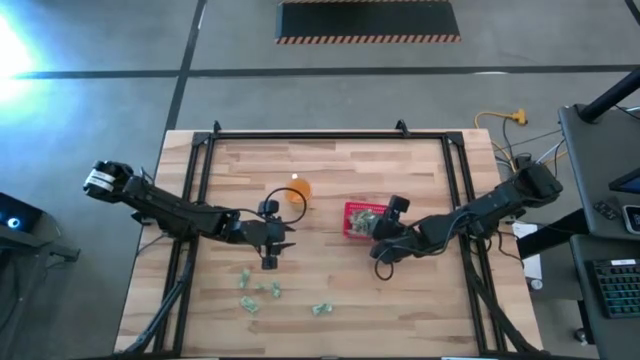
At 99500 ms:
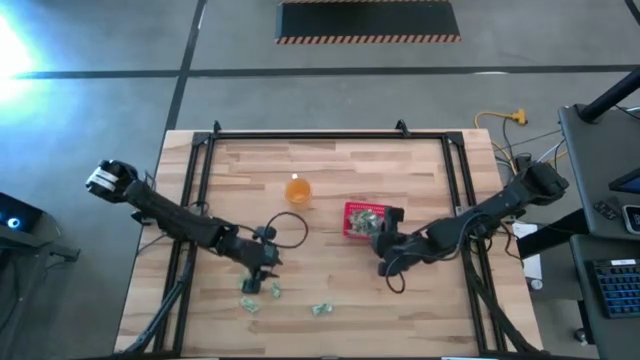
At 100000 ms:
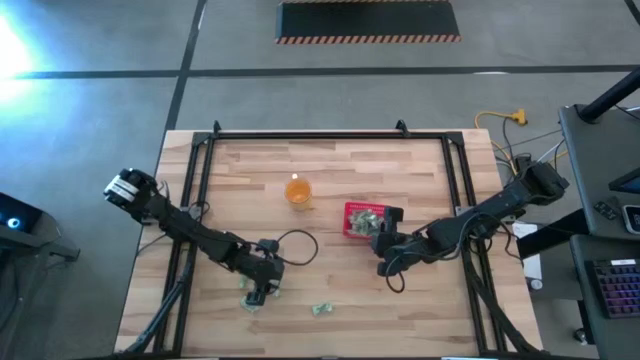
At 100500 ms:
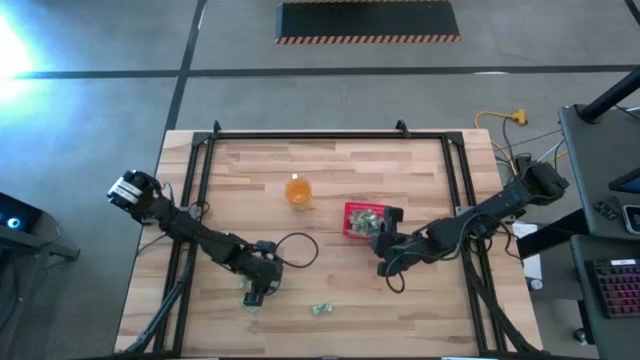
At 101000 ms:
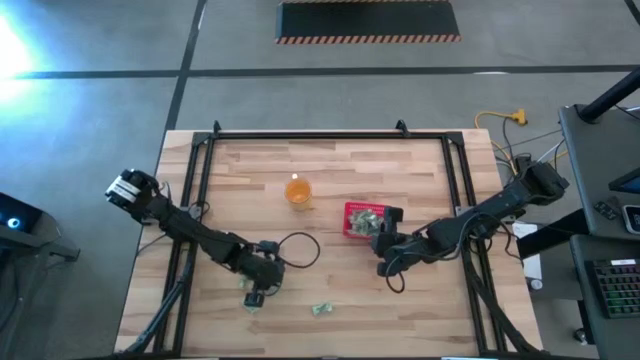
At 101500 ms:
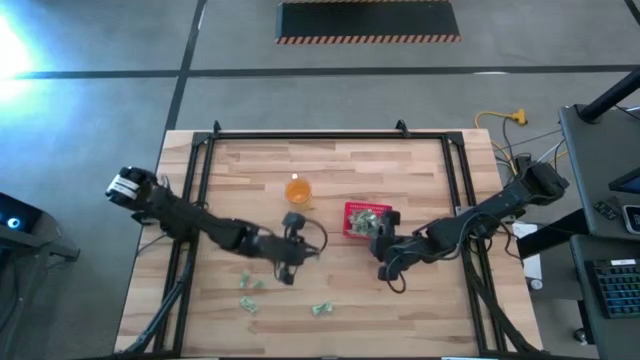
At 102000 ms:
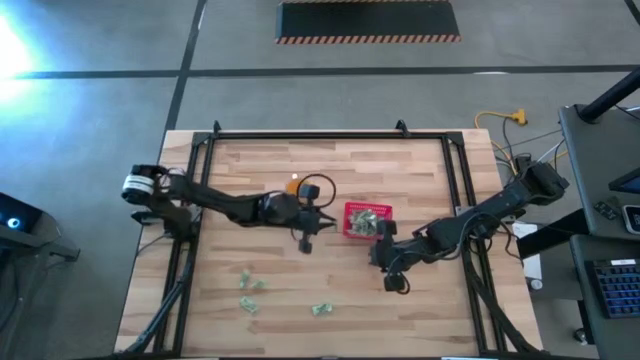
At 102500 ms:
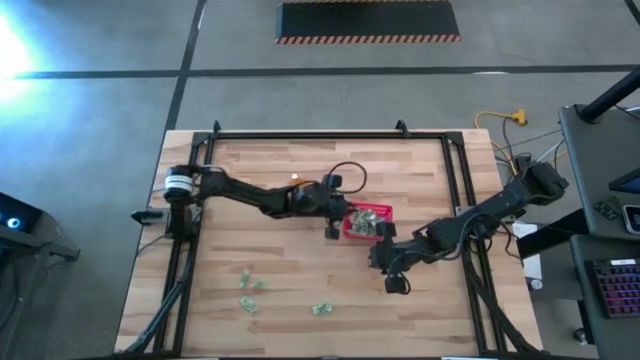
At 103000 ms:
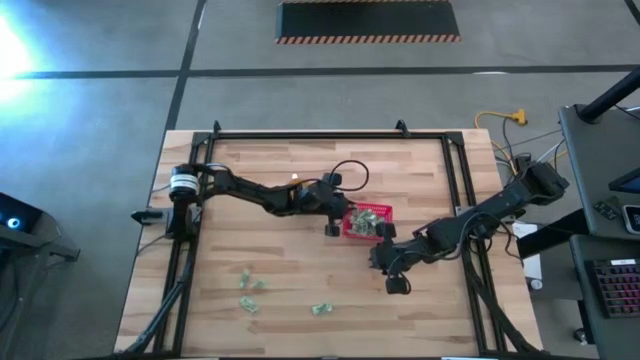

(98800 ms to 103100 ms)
Task: Pick and place Stevia / Truvia into bins
Put the stevia packet into the basket

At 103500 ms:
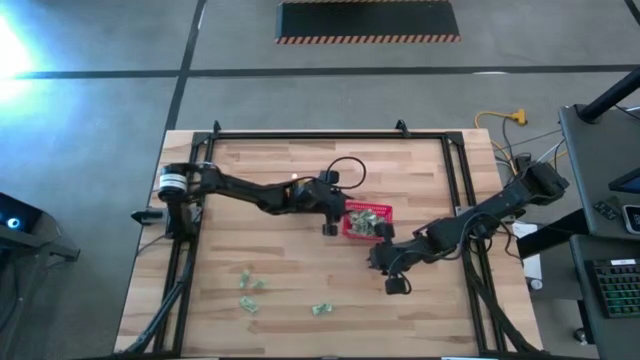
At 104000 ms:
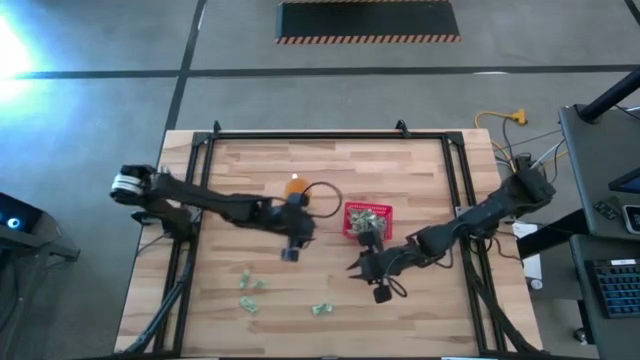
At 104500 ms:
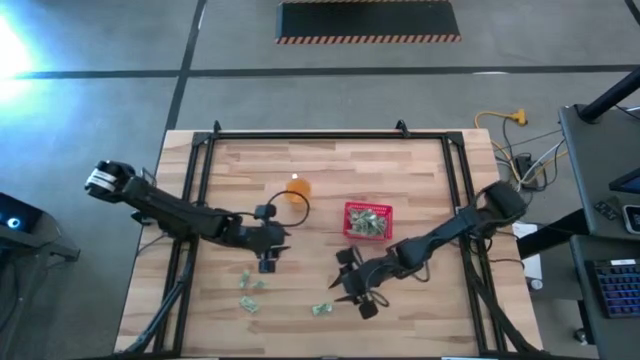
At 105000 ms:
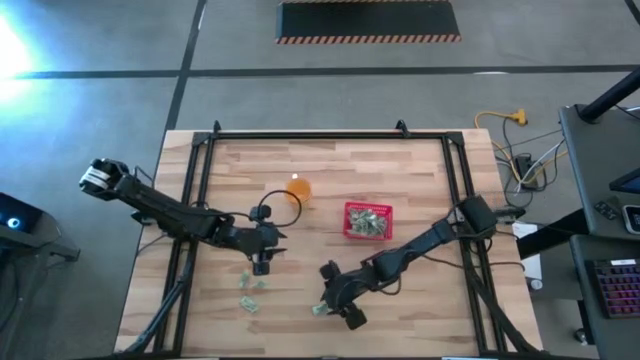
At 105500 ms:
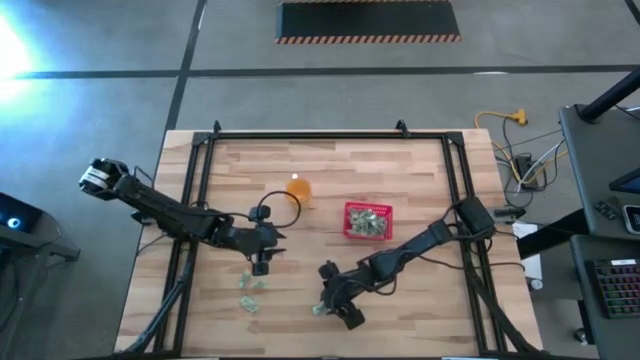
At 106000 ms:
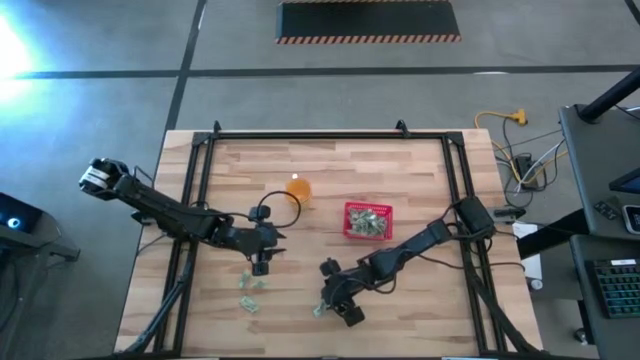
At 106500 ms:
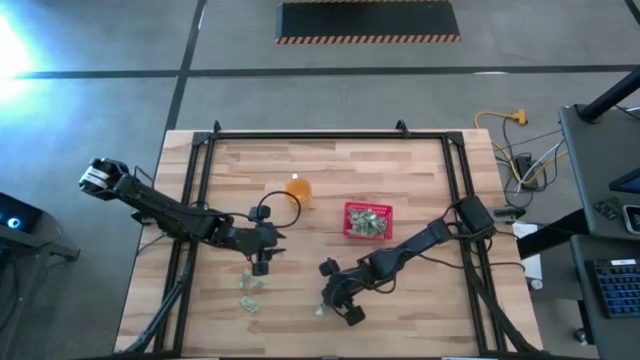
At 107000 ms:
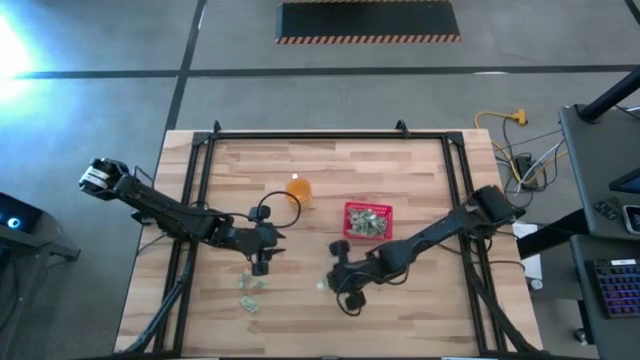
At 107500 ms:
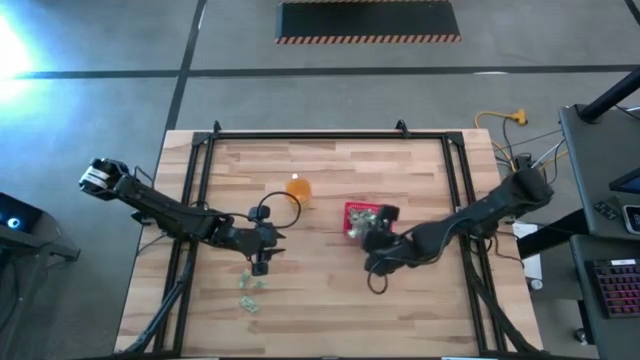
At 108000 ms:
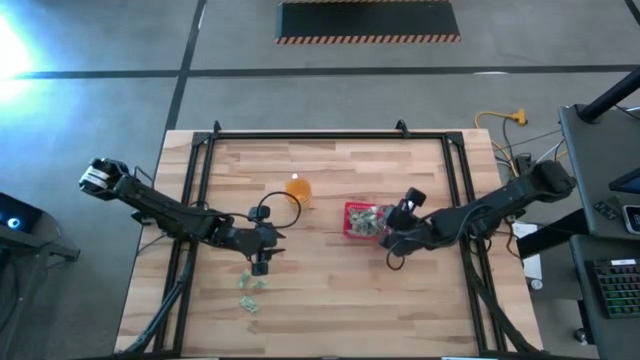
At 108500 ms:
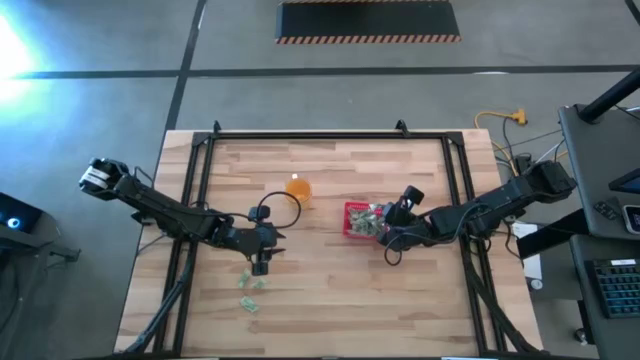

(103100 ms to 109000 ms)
Put the stevia packet into the basket

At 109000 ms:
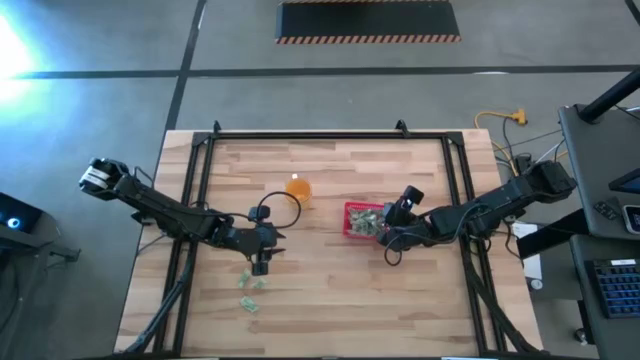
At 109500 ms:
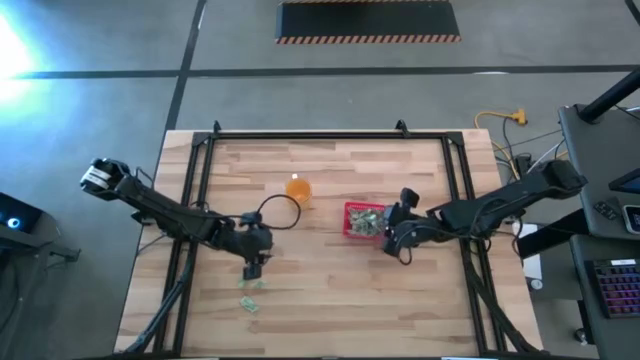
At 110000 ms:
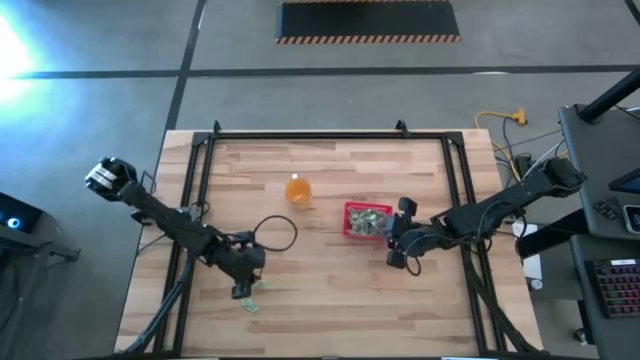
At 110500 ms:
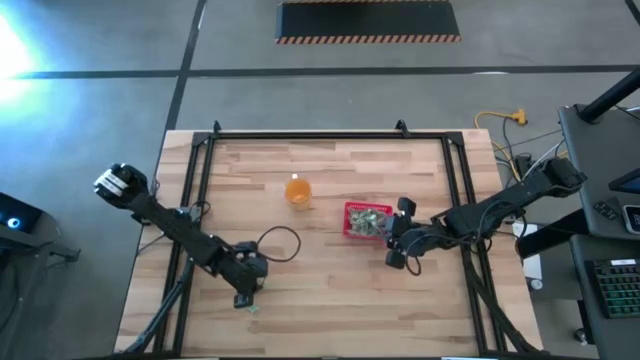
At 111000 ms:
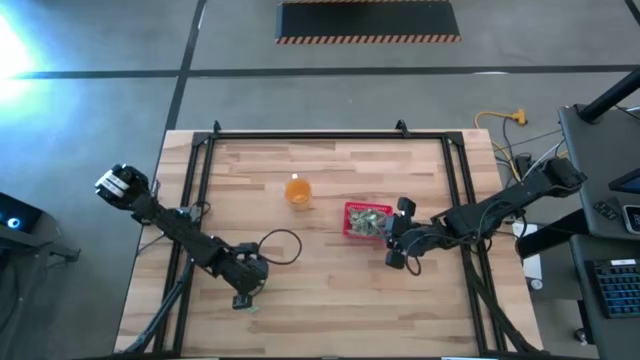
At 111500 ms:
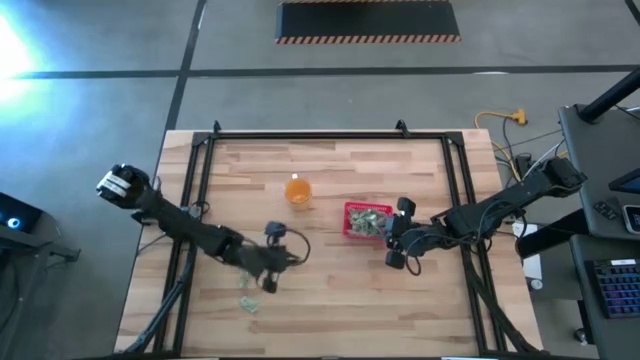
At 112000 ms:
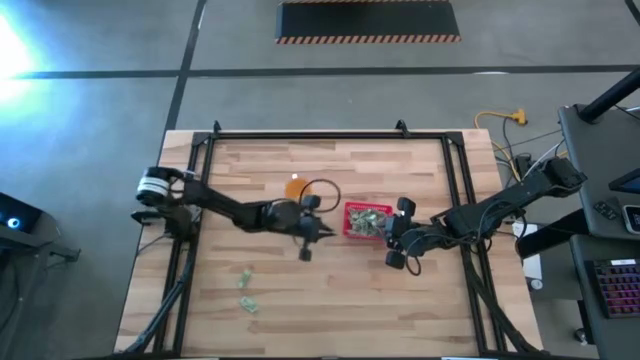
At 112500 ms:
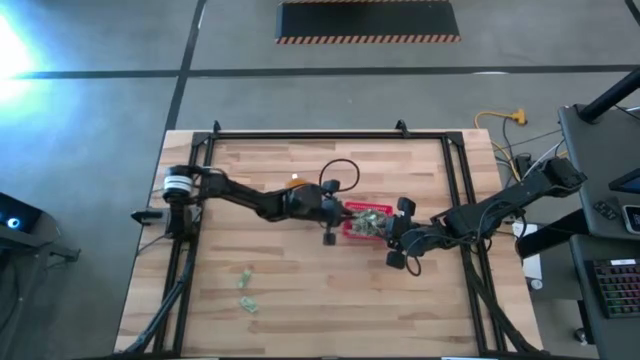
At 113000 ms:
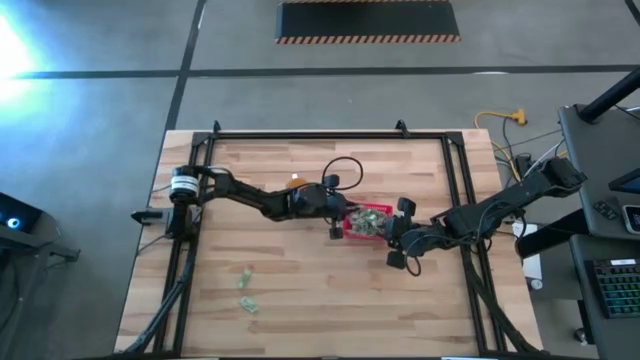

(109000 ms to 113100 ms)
Put the middle stevia packet into the basket

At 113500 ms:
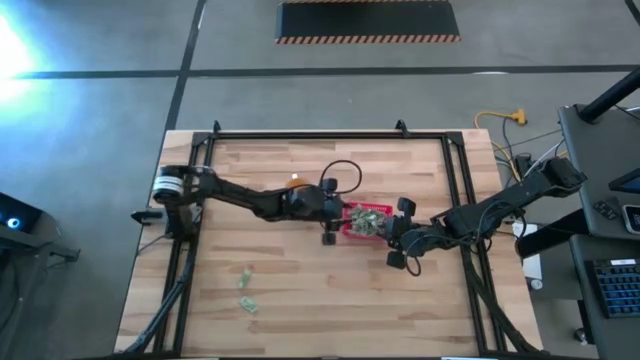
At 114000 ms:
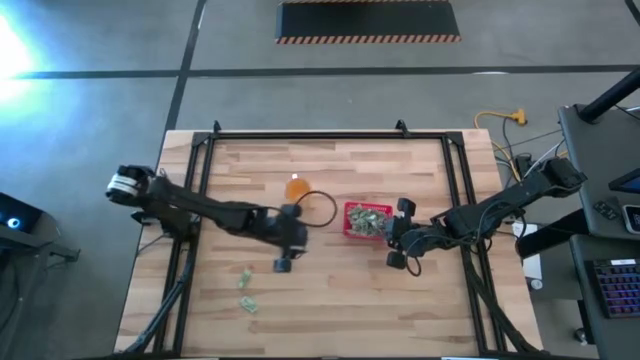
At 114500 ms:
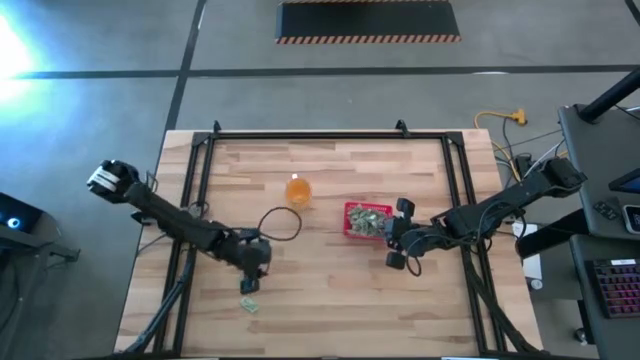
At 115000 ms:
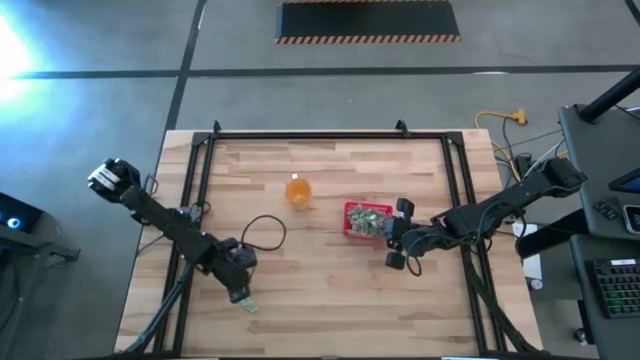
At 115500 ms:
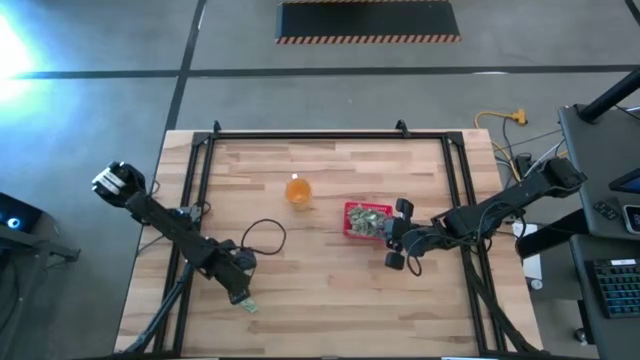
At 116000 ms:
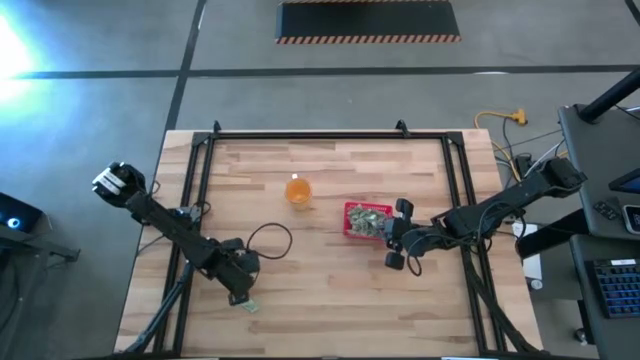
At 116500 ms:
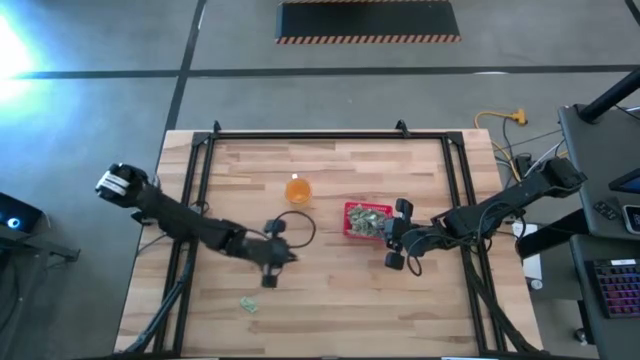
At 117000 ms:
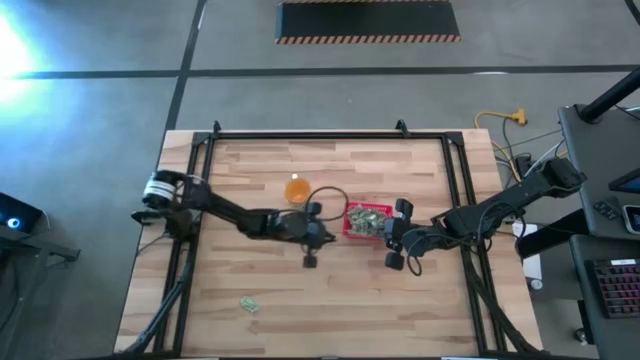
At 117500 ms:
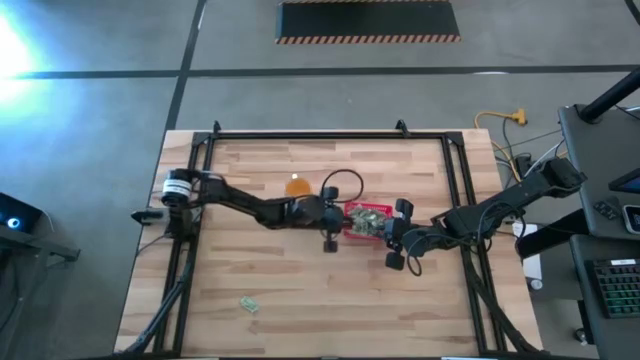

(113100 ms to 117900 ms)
Put the top stevia packet into the basket

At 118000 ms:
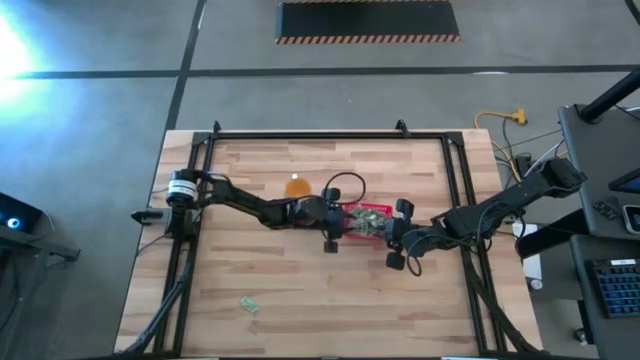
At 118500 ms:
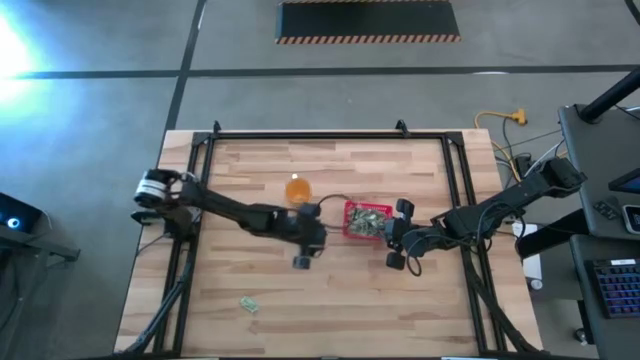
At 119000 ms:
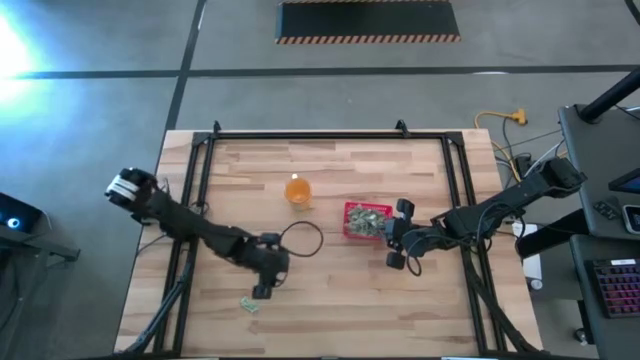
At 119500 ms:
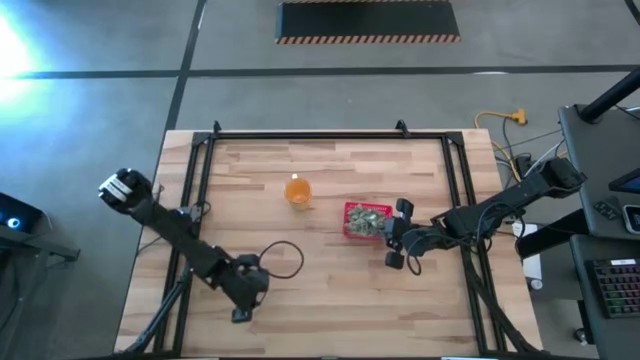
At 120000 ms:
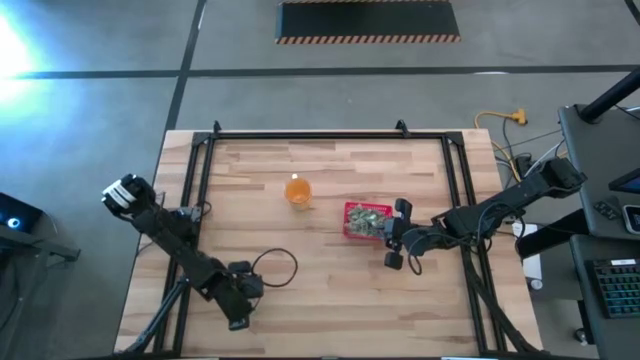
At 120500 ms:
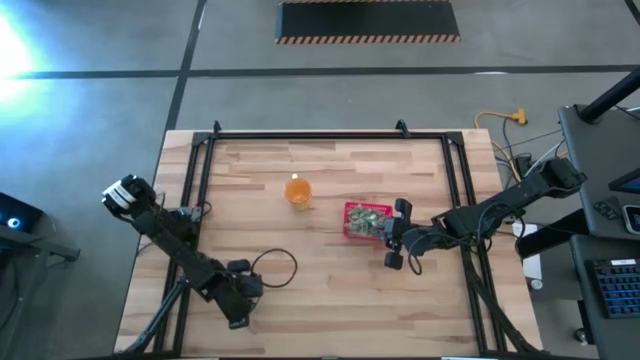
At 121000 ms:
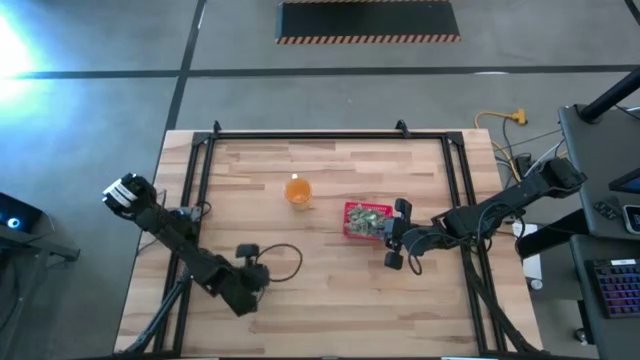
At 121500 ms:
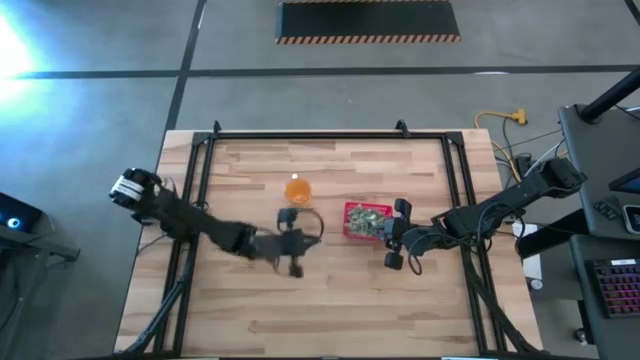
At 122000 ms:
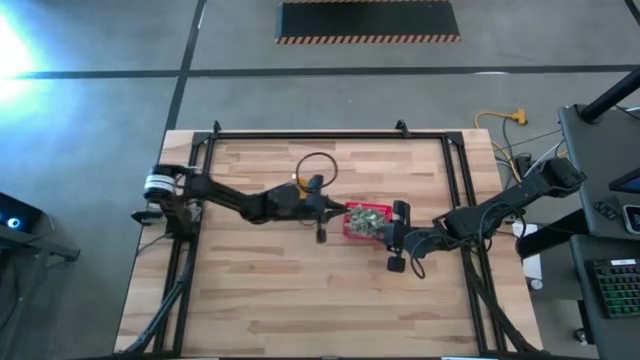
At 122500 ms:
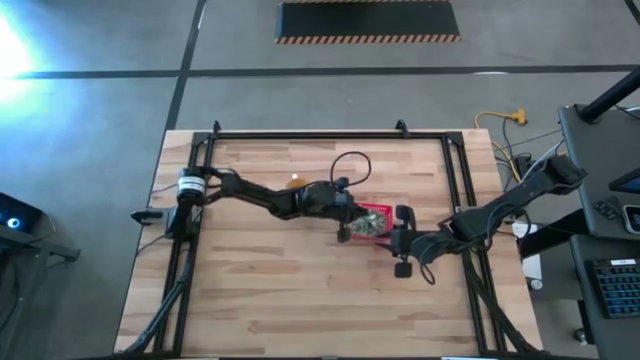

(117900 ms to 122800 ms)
Put the stevia packet into the basket
